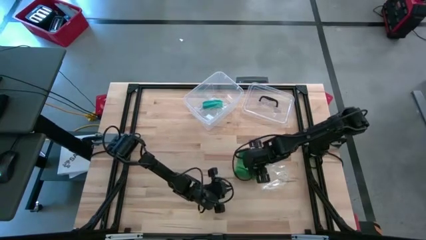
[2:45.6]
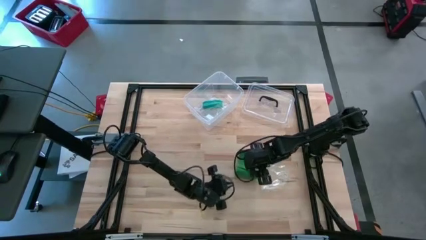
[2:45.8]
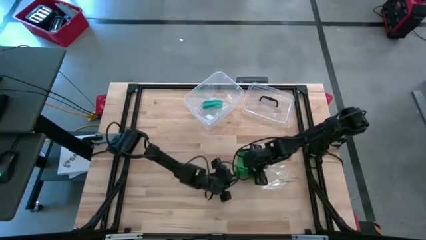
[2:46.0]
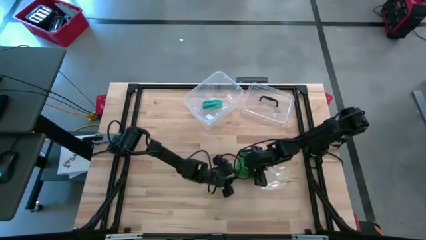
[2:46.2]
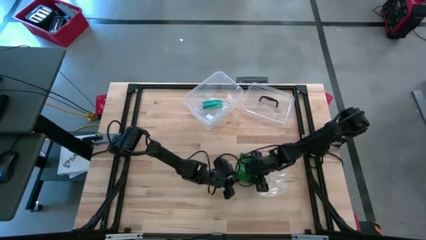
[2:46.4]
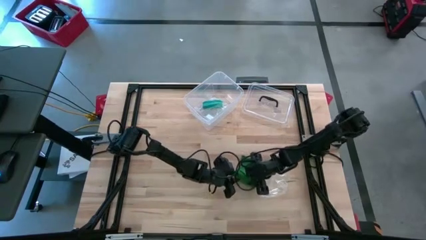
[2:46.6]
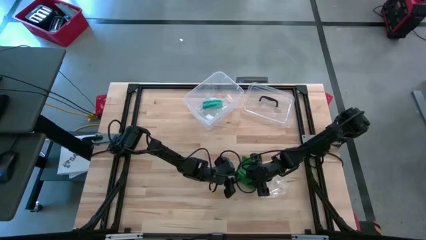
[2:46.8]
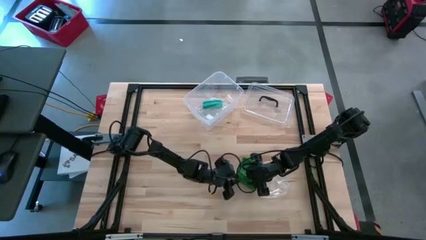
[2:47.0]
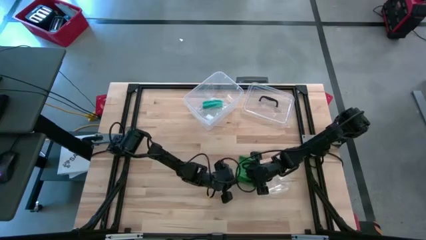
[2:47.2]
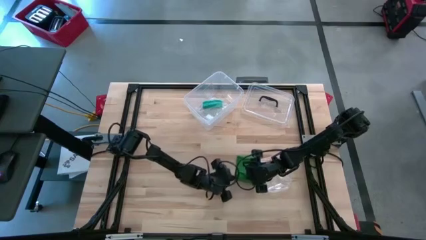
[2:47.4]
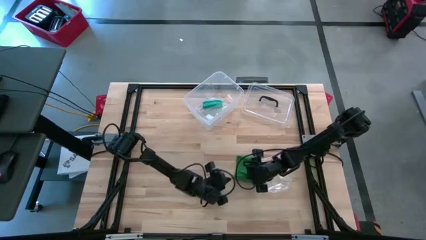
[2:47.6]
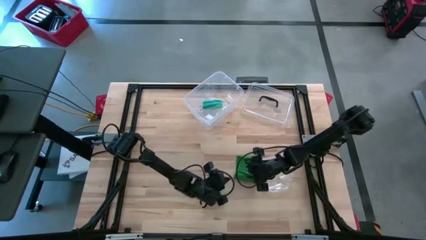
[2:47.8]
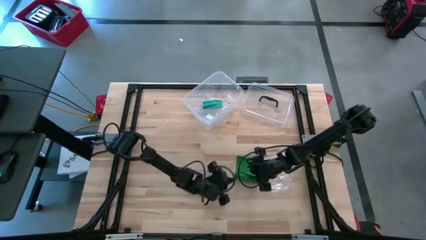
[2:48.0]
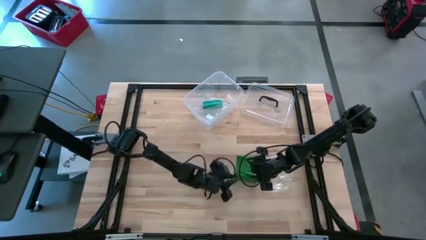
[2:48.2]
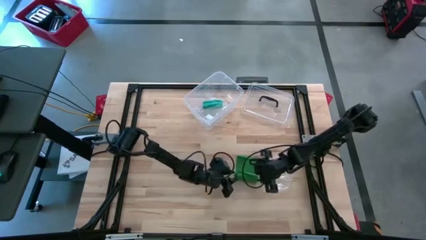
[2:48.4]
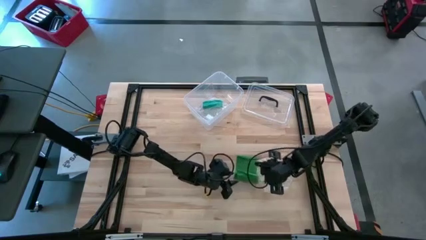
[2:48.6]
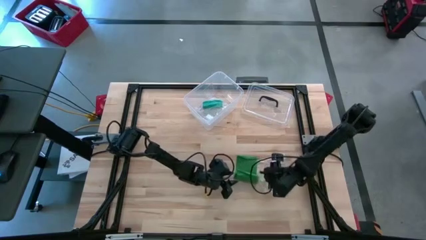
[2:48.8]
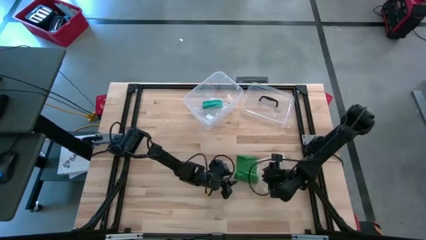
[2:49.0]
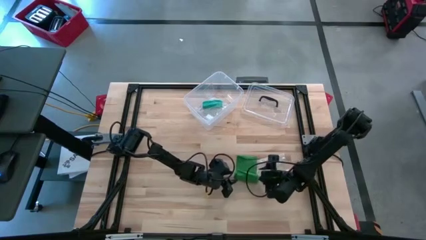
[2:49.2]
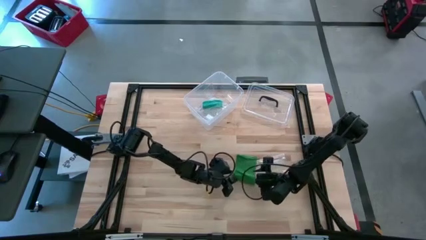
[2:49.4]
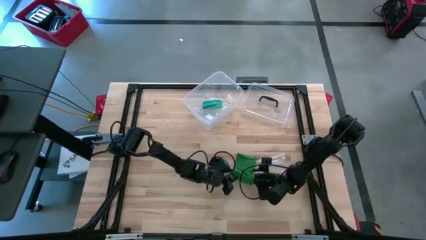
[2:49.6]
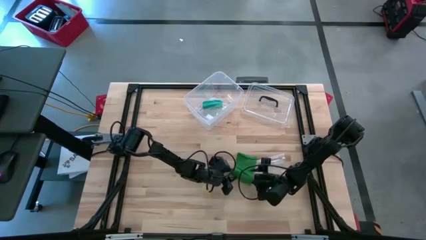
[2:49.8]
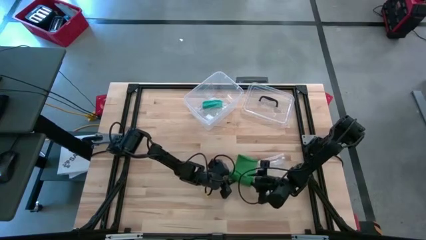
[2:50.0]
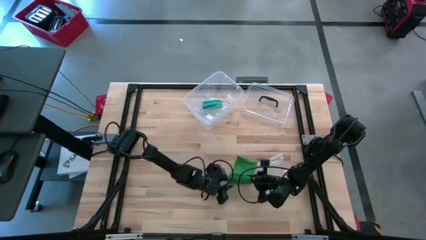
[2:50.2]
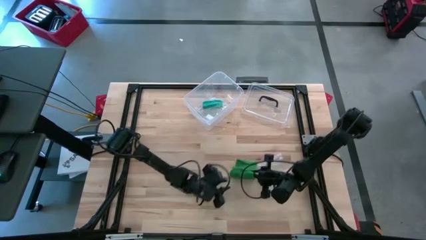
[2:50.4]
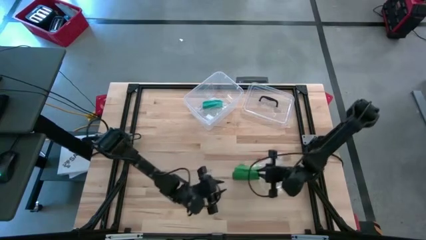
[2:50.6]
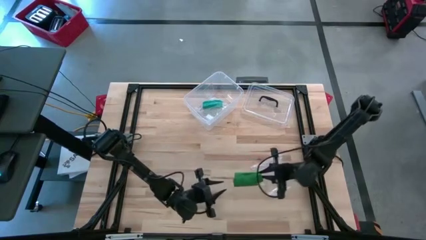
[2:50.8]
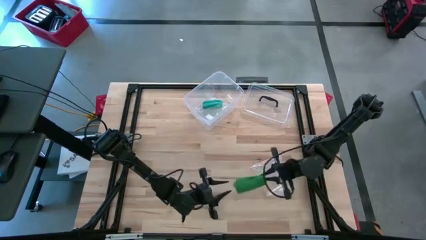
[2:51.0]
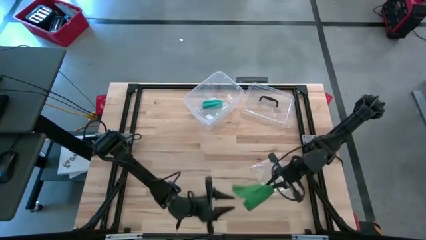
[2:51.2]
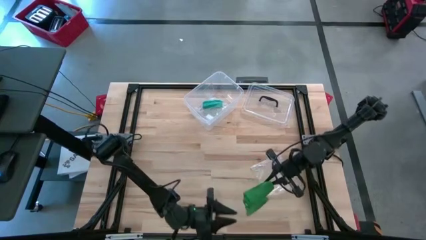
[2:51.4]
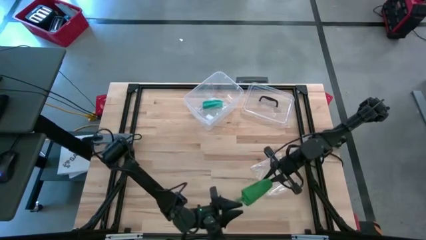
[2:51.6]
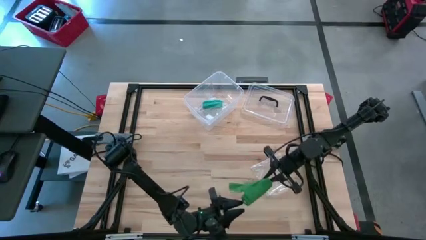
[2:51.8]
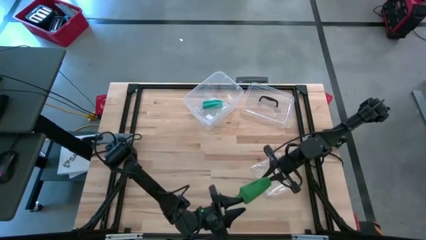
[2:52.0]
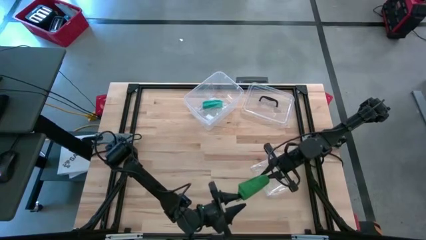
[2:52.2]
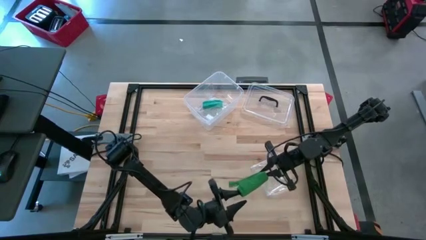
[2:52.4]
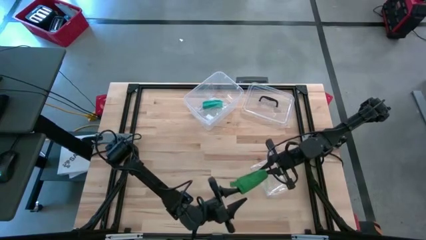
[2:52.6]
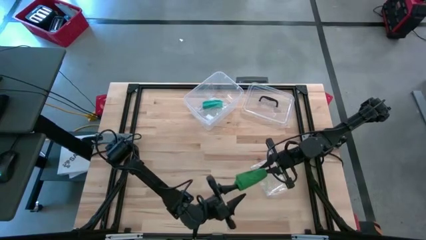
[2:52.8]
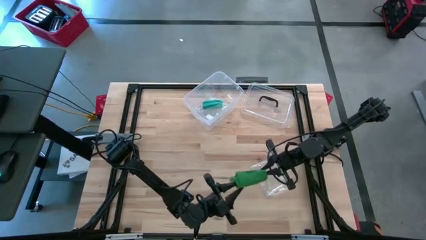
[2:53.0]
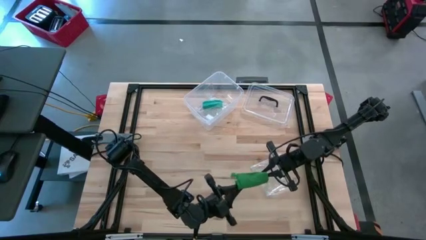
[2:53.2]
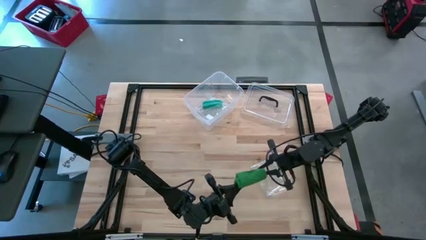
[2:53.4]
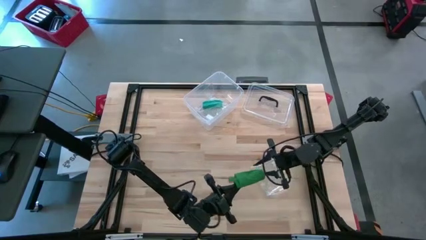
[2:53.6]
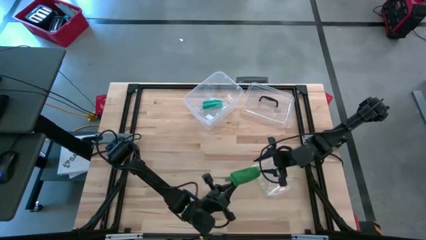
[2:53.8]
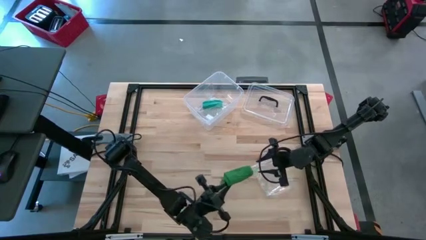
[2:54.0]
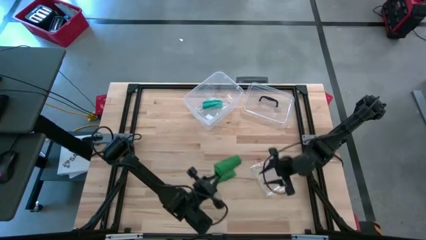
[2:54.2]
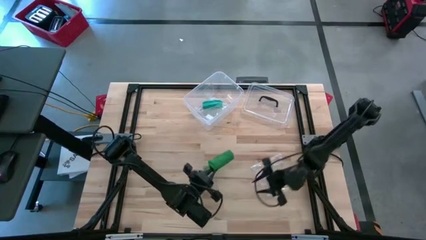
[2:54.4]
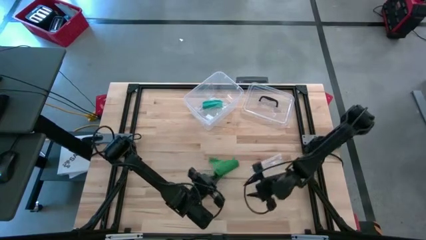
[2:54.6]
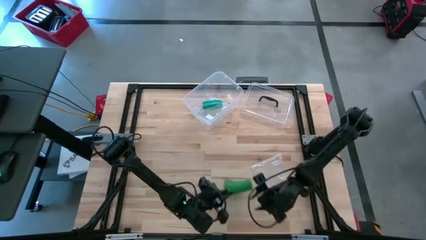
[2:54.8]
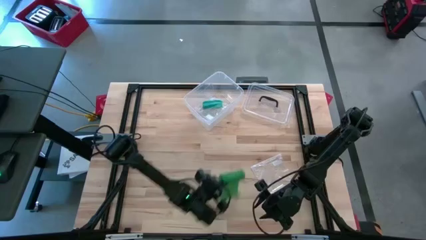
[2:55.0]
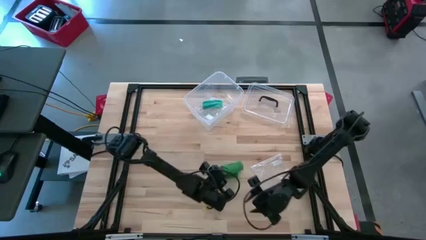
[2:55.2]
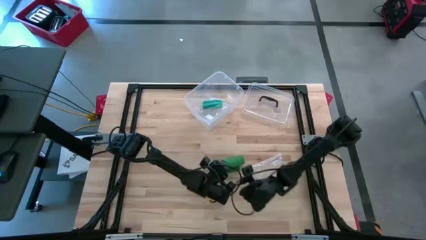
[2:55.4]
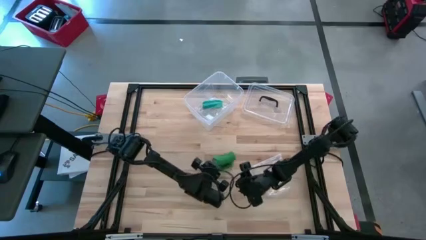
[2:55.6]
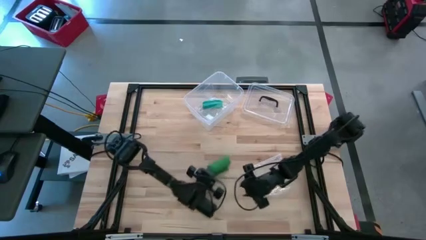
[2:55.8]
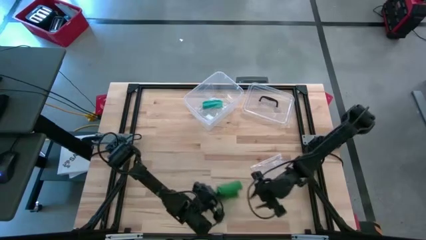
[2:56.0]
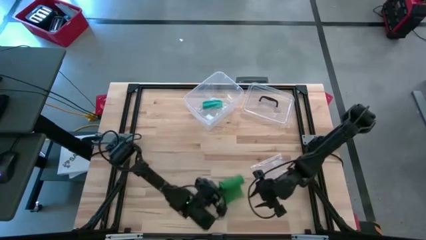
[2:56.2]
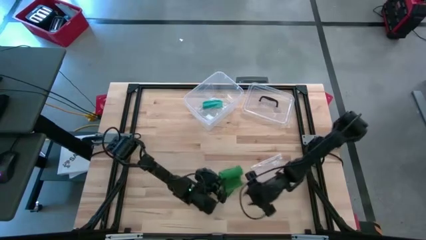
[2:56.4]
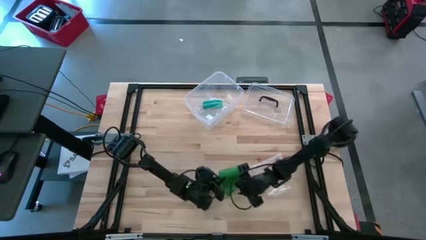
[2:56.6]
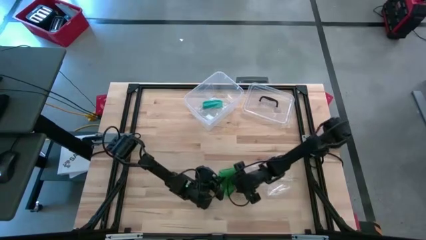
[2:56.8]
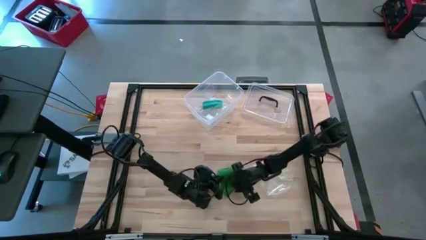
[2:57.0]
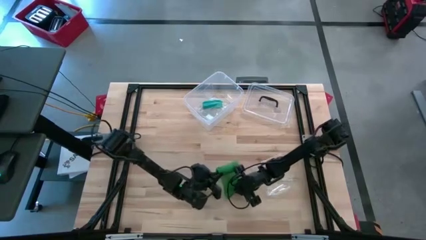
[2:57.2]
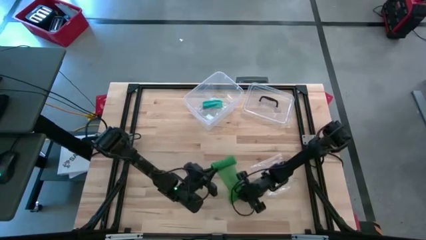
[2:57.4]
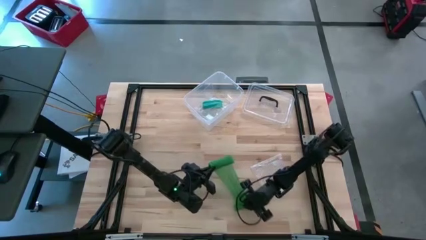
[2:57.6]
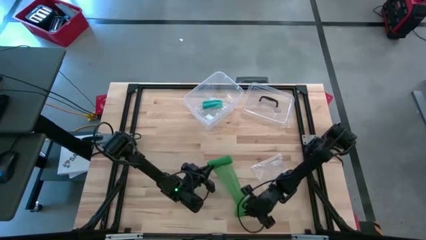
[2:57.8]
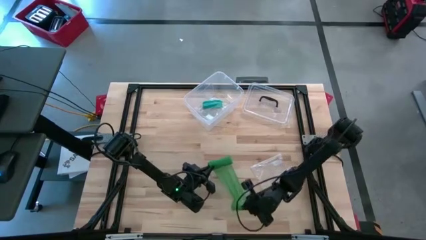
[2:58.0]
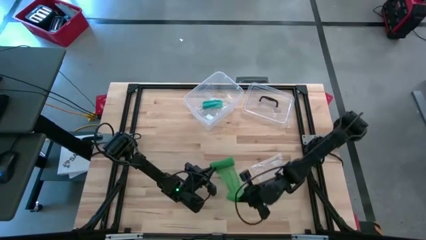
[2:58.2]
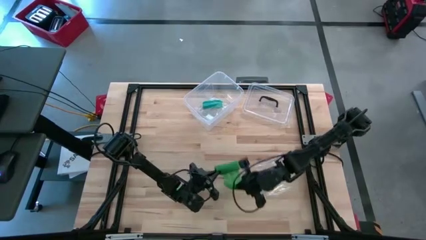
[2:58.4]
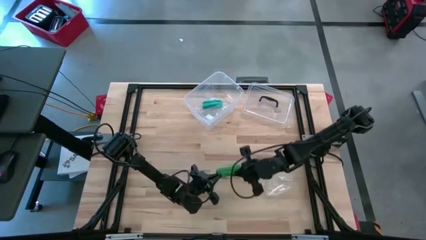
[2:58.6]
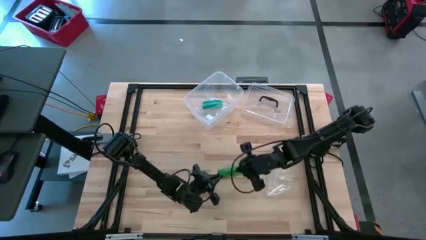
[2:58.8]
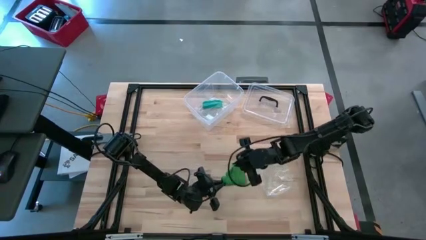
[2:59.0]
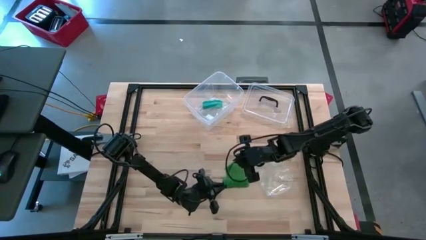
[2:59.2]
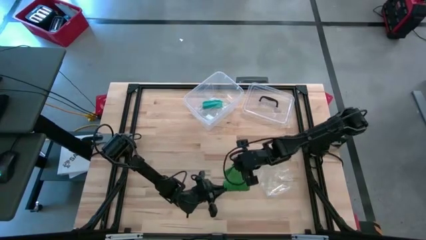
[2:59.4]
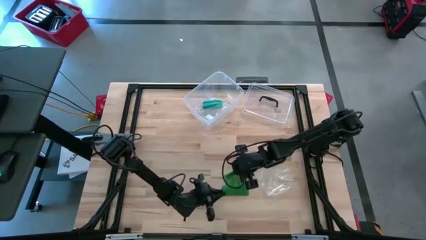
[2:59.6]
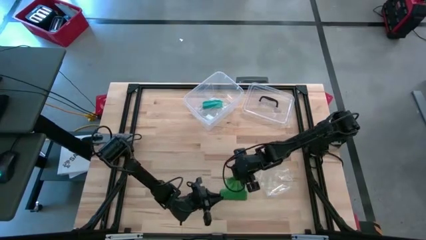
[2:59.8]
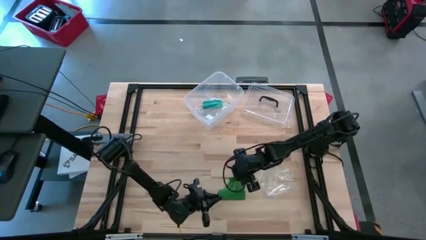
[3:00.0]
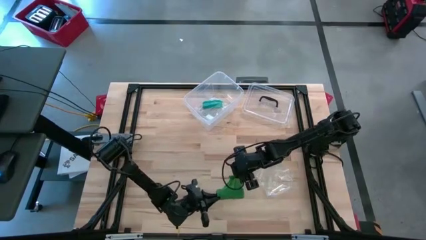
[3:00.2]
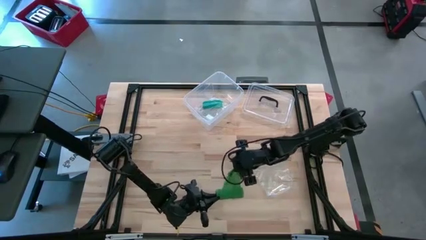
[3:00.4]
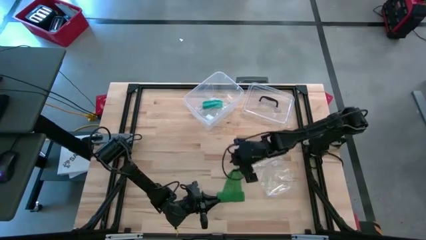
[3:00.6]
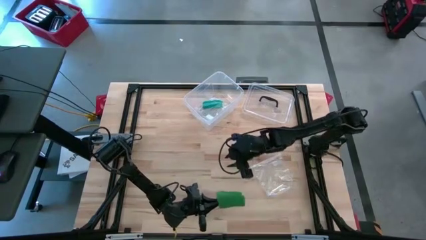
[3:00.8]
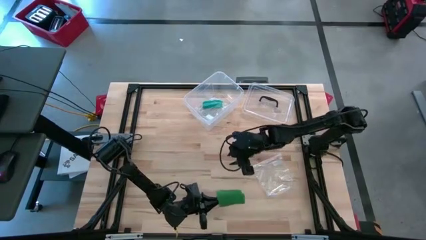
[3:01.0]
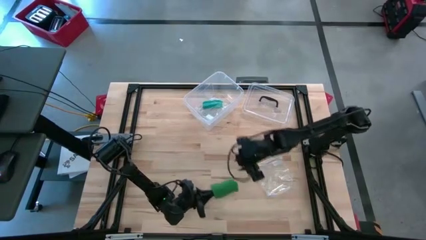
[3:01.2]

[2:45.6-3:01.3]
Task: Roll bandage
Roll the green bandage
